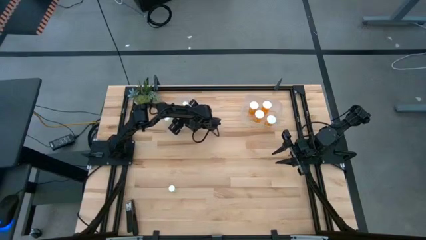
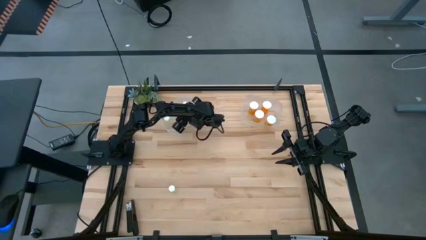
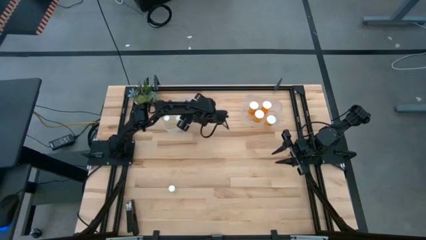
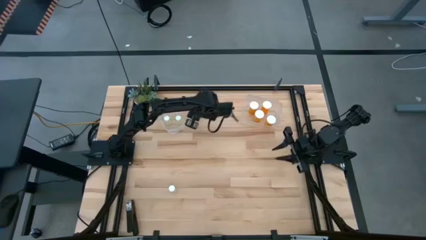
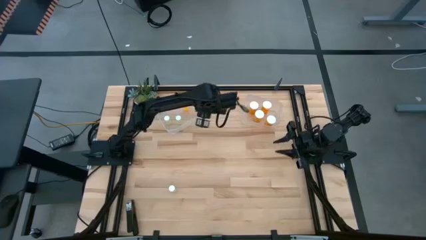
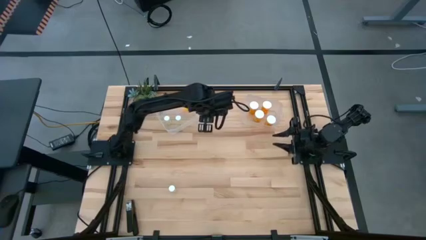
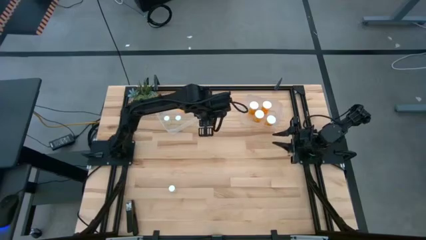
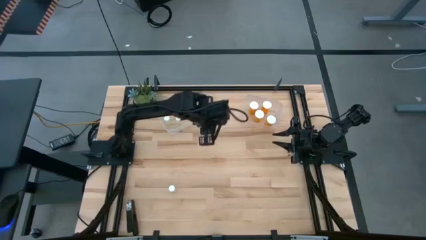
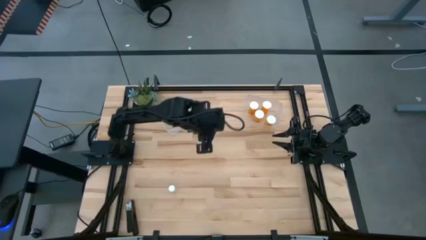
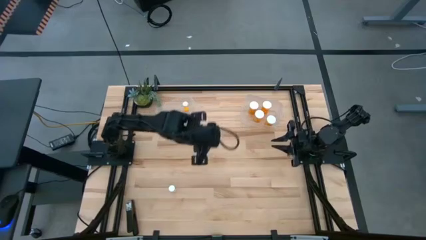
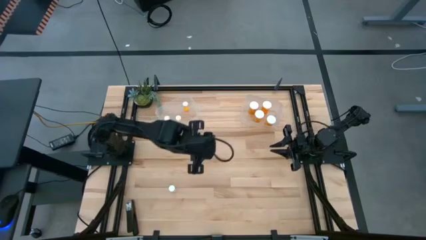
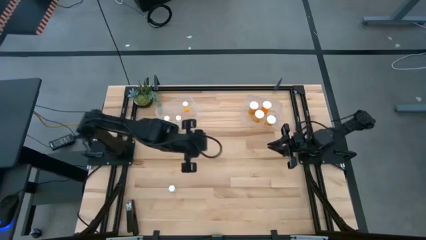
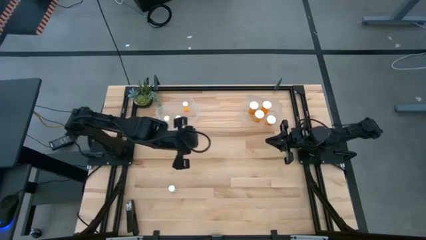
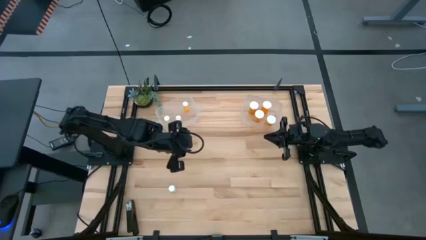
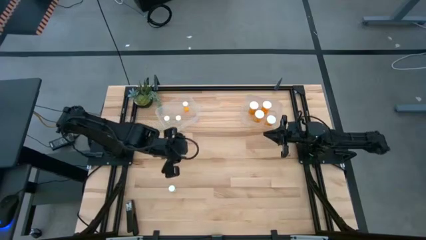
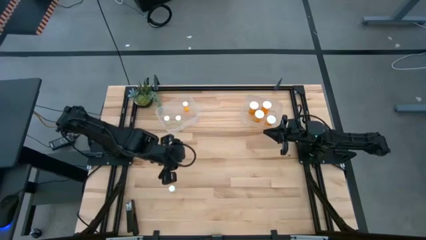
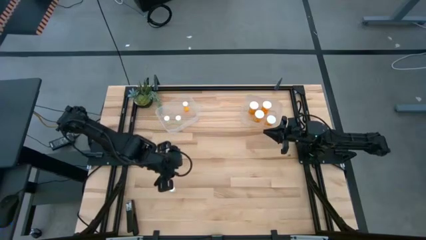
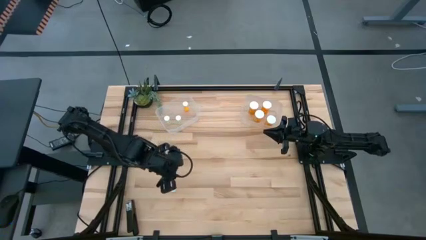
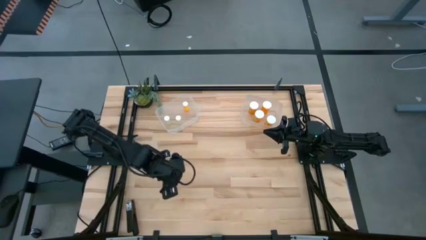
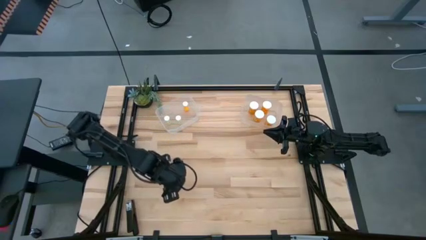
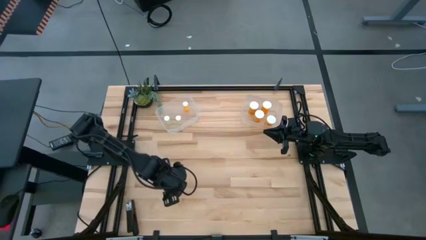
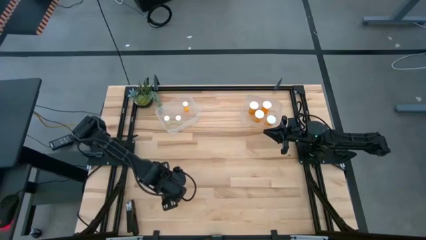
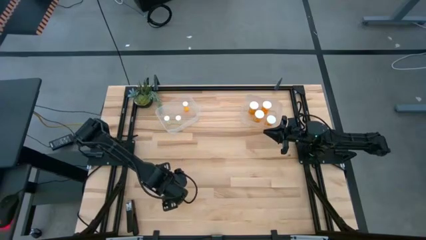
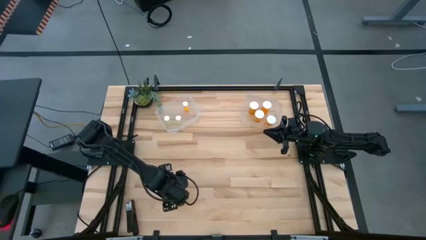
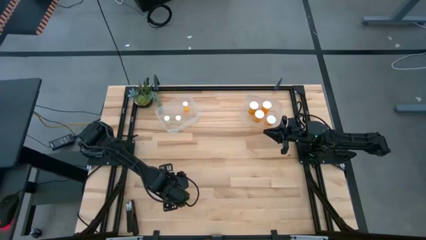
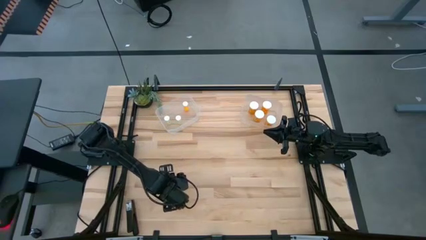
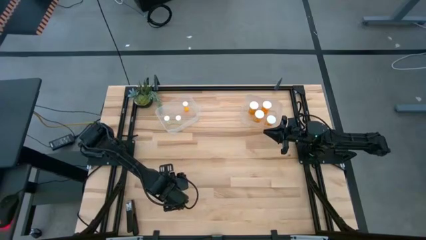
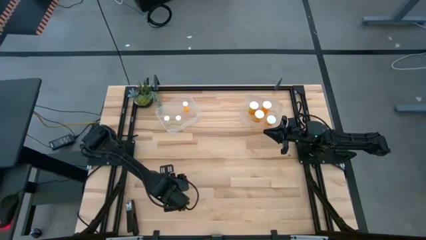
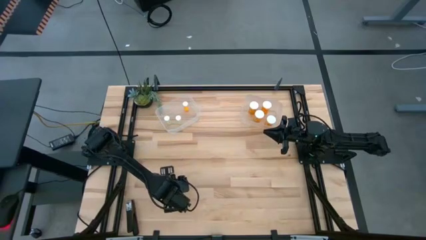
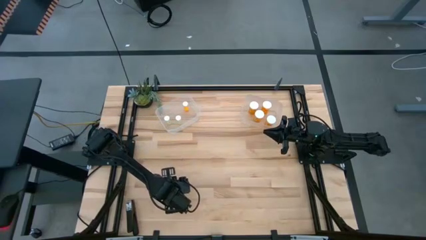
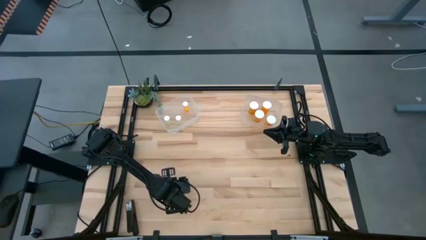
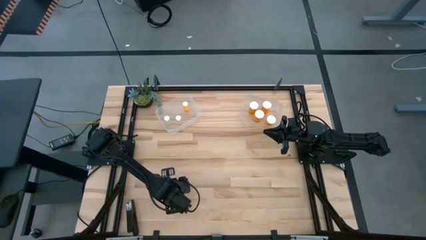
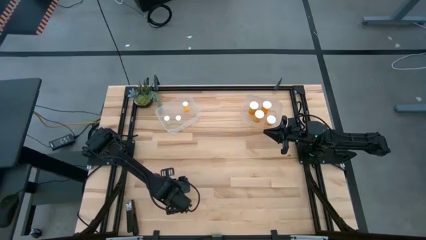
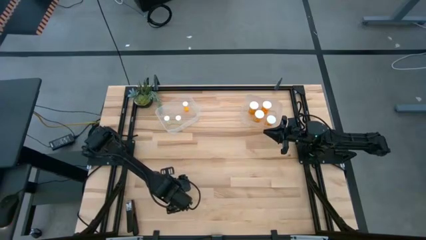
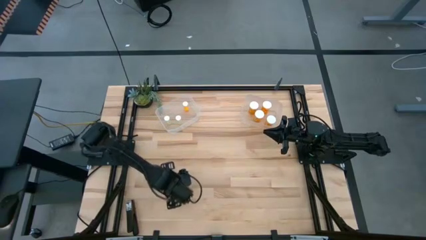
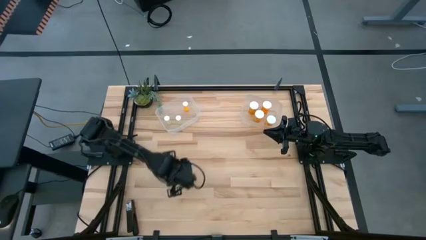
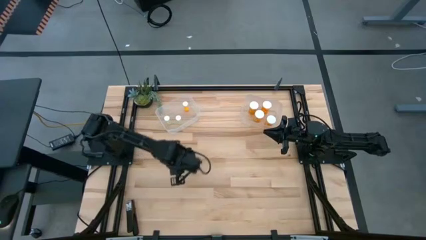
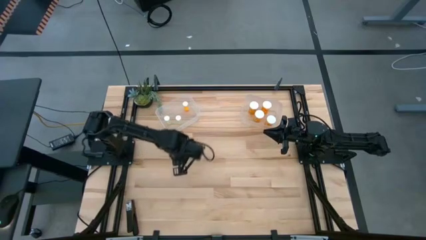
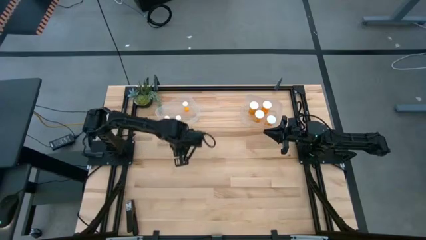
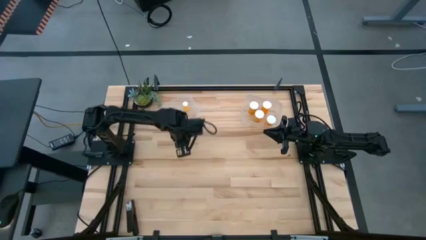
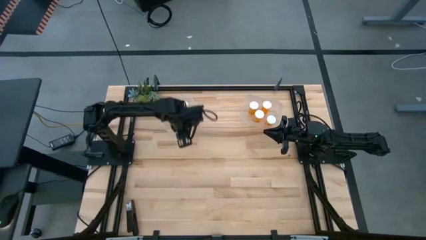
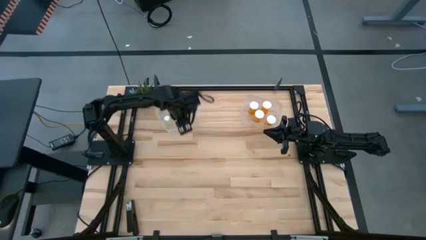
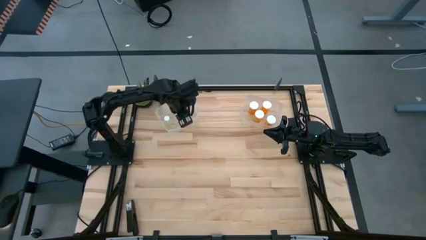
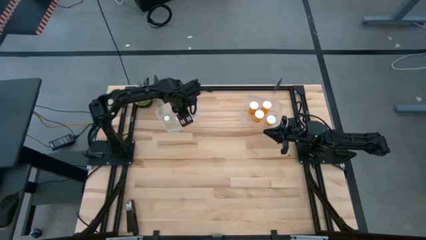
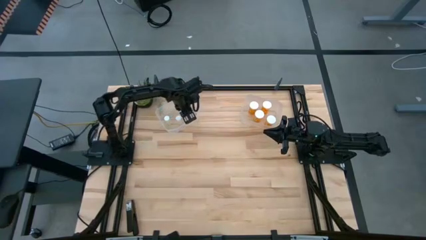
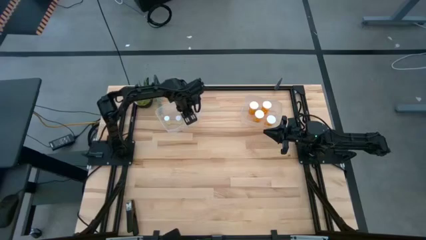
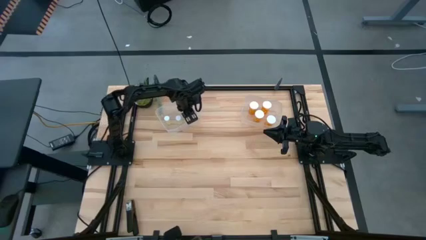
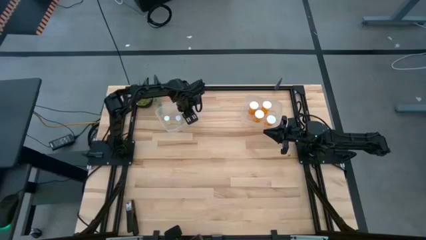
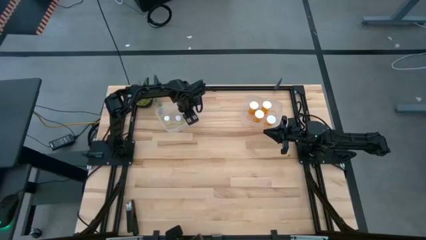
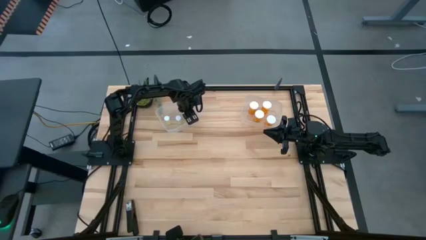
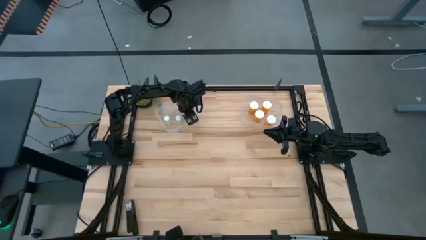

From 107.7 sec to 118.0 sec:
Task: Pick and place medicine bottles into bin by pill shape (circle, oval)
Put the small yellow pill bottle into the left transparent bin

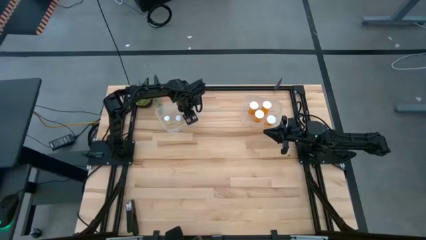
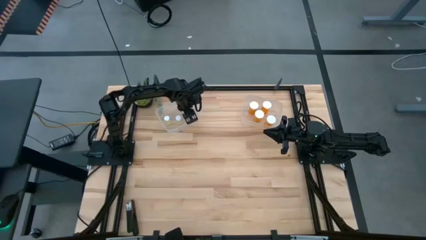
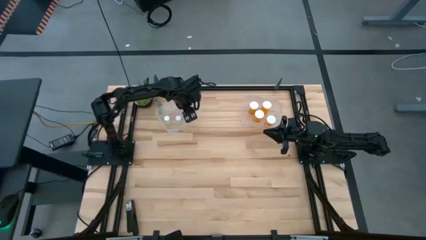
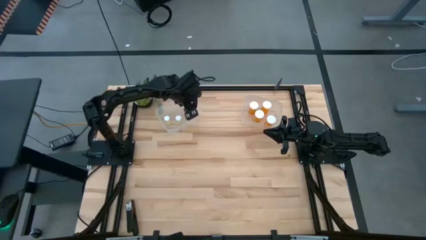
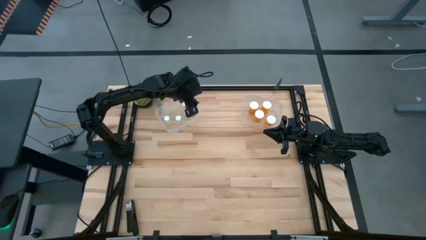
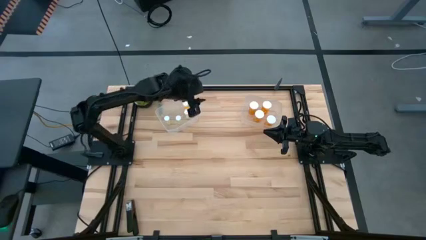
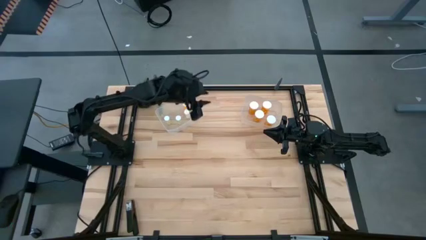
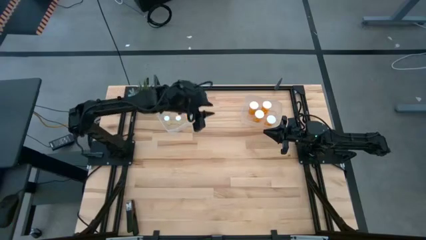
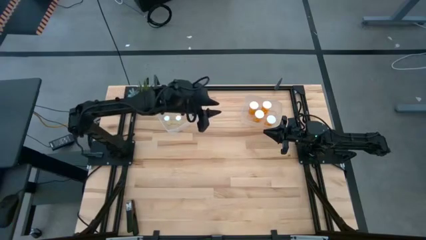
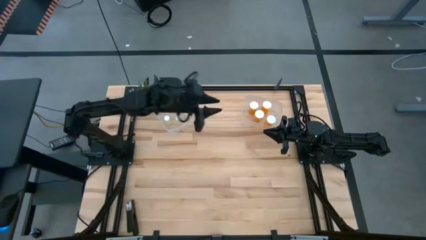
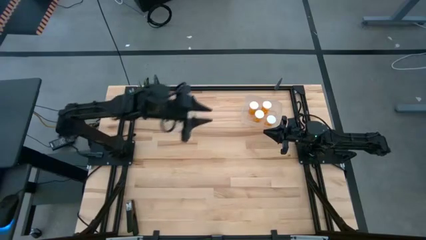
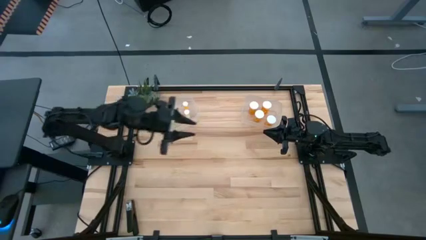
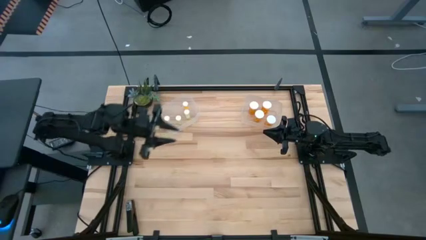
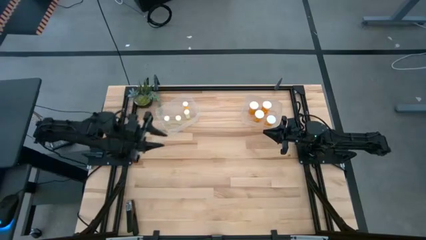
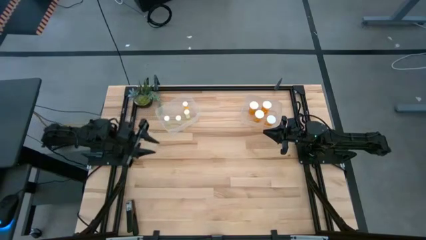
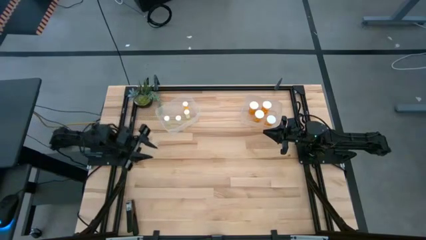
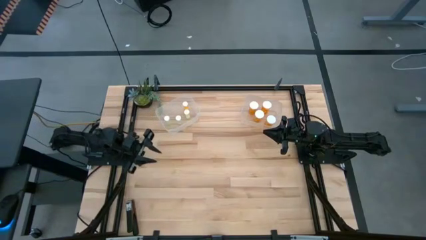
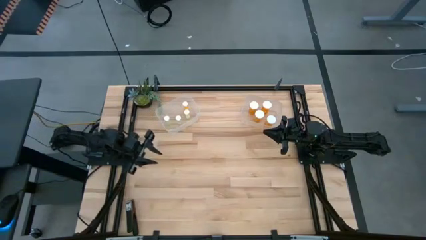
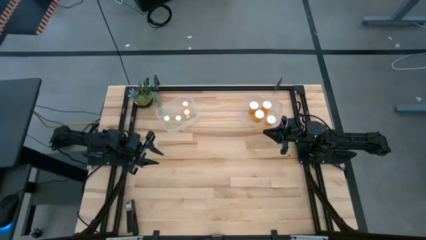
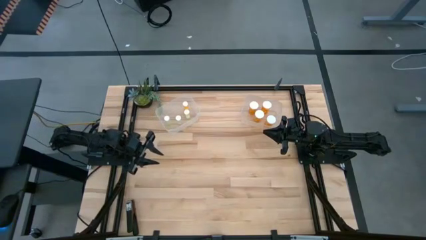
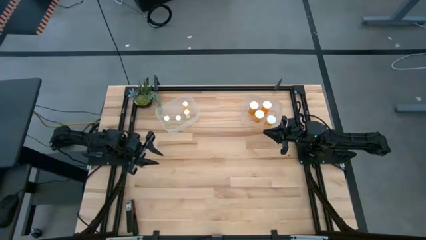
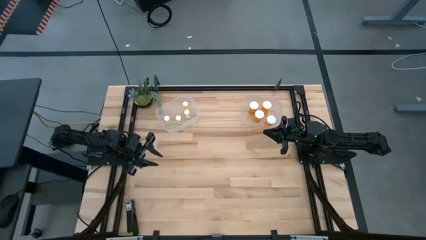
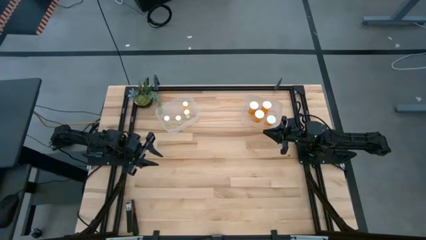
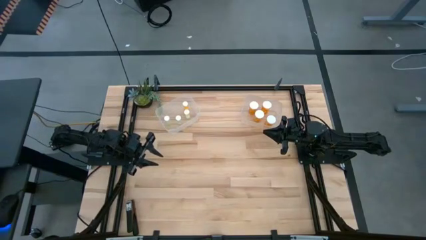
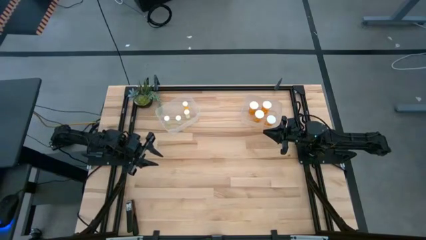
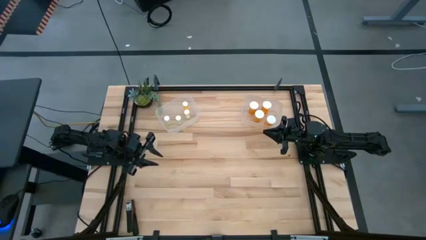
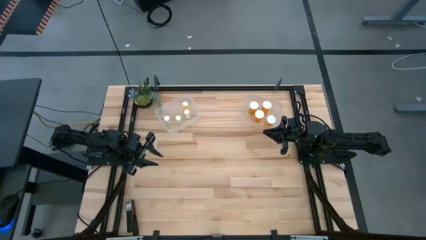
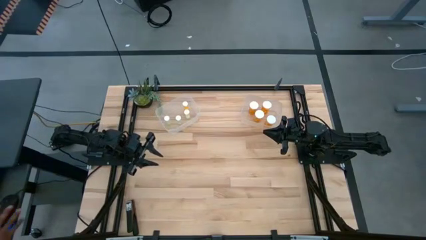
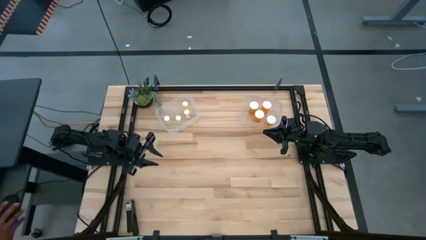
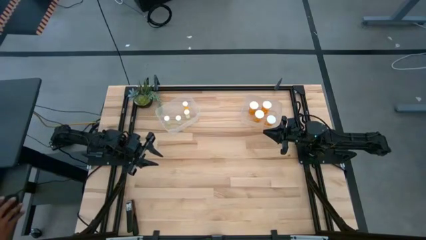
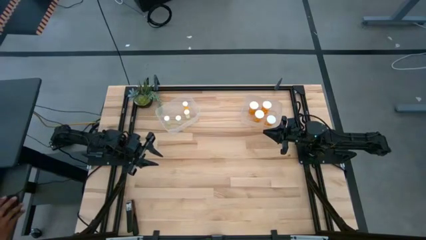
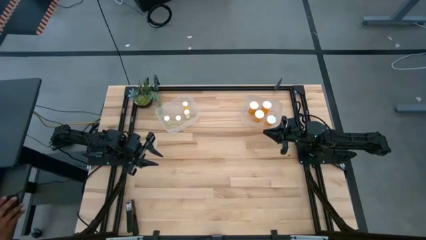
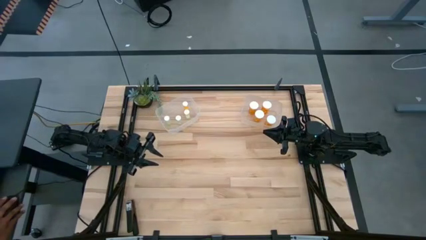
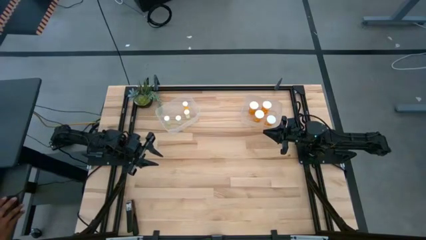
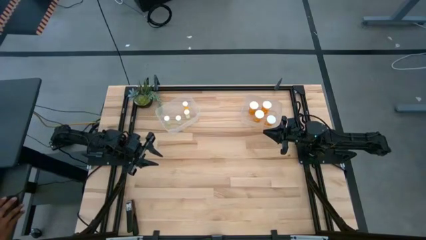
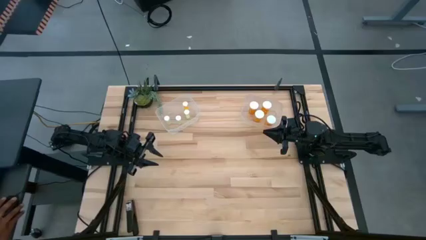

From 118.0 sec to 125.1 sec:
Return to Home Position
